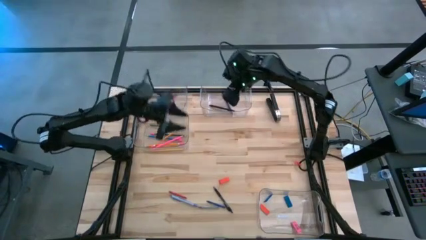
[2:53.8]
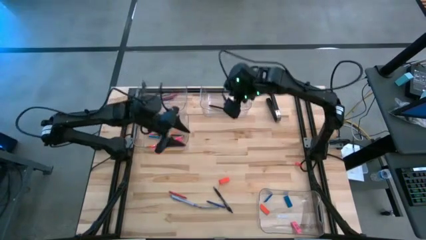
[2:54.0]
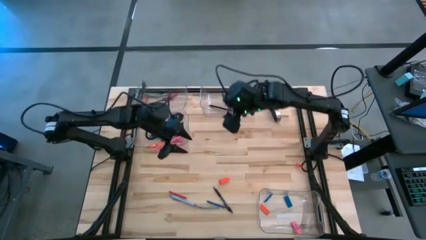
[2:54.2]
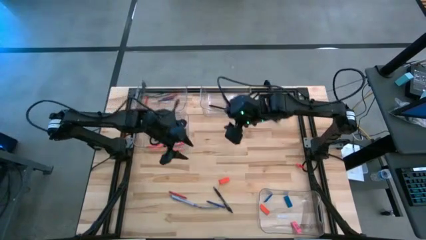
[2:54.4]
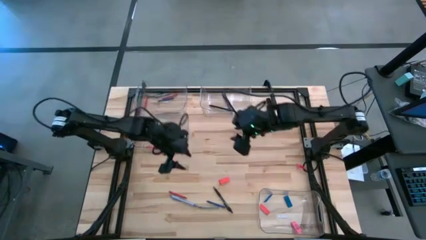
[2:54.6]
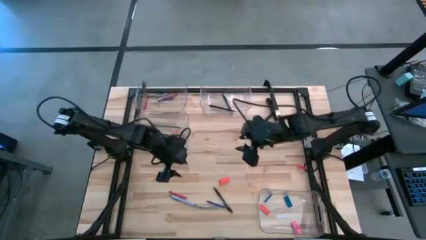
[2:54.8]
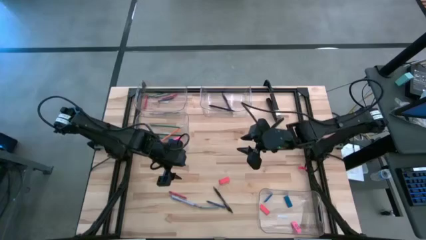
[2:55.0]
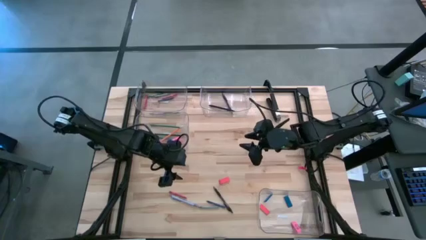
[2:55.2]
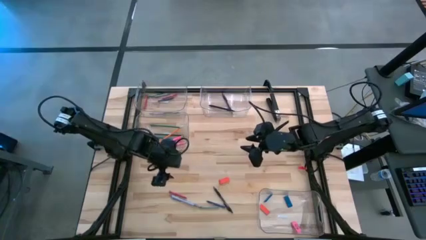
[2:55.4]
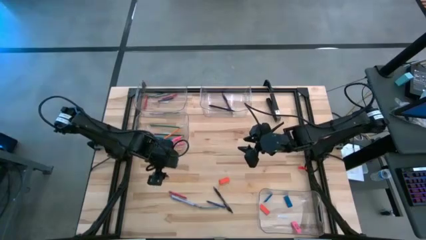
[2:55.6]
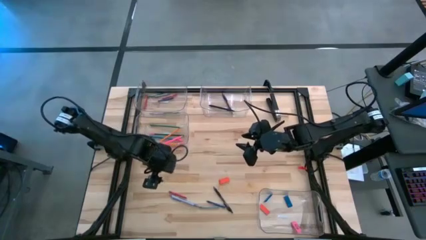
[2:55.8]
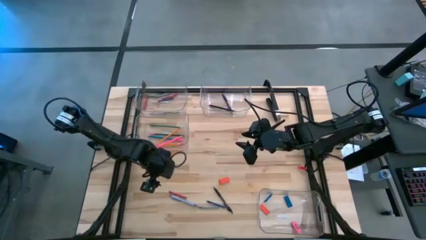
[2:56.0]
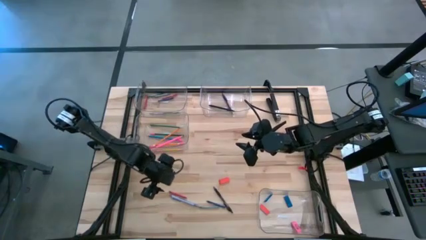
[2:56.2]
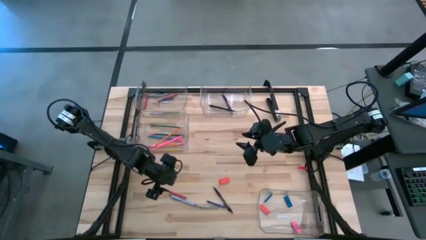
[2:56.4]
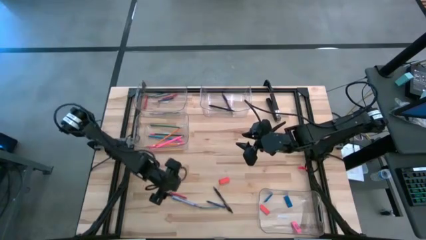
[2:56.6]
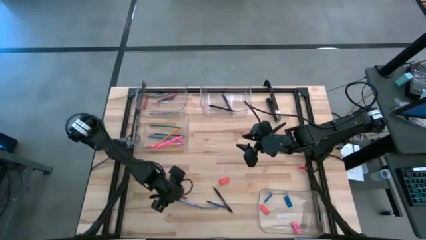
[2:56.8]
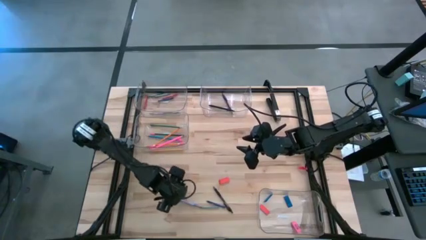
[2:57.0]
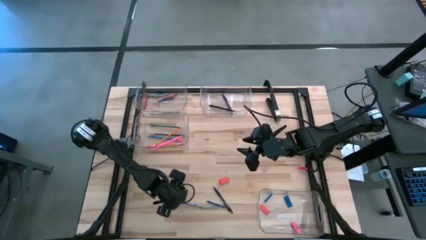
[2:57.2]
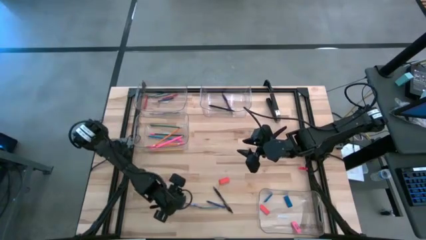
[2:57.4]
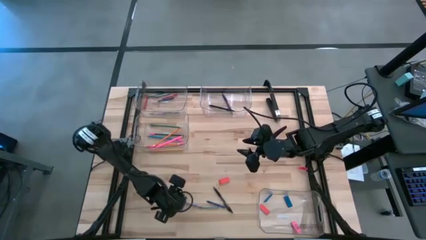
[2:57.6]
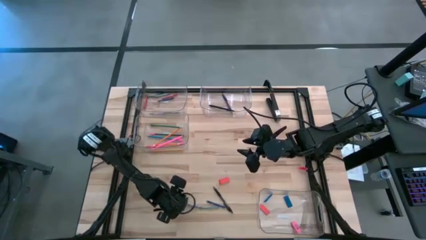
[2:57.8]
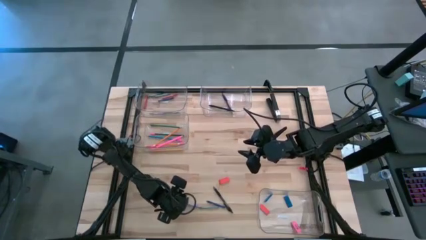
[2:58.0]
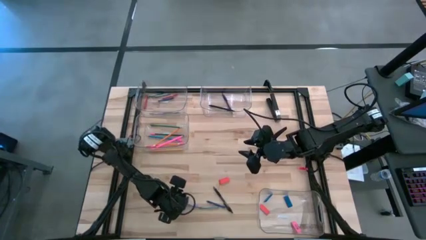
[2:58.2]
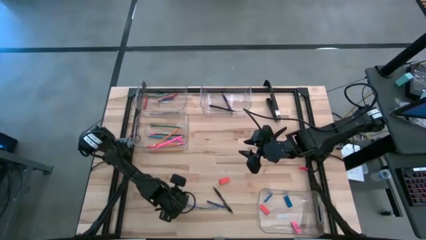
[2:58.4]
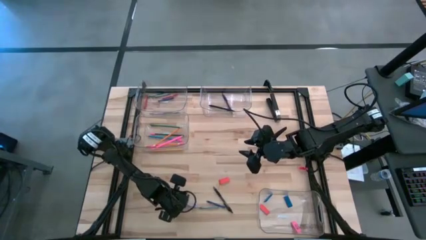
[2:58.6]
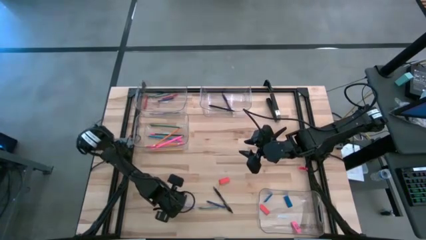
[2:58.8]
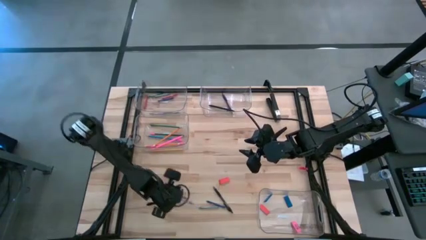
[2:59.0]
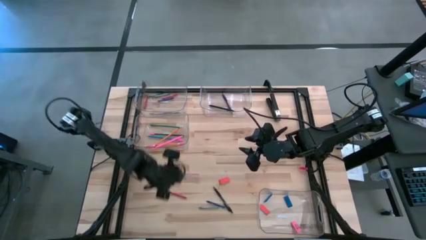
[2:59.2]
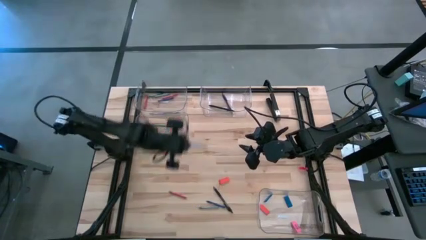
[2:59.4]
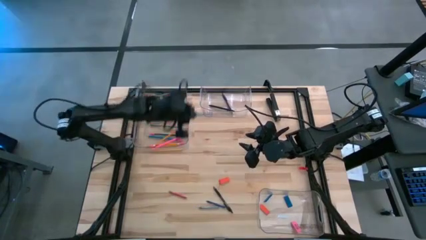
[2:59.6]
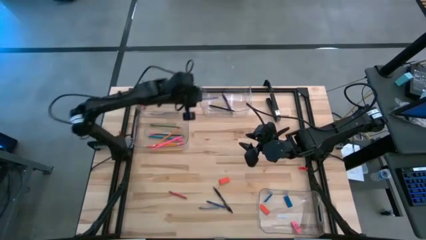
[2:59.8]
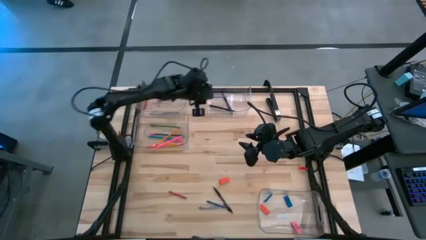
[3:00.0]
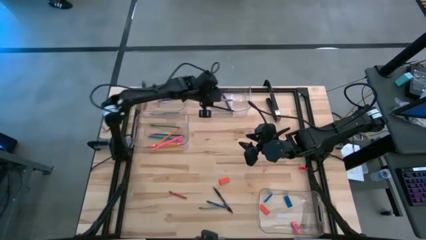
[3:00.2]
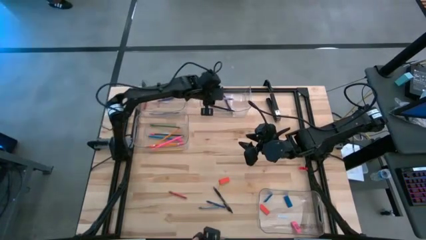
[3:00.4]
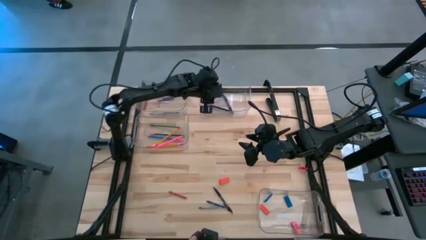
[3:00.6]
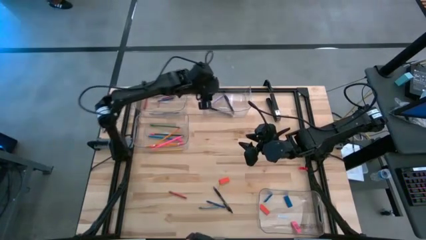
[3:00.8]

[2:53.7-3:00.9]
Task: Sort crayons/erasers/pens/pencils in bins
Put the blue pen into the top right transparent bin

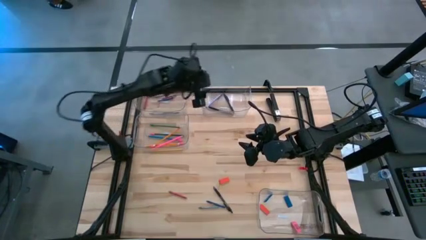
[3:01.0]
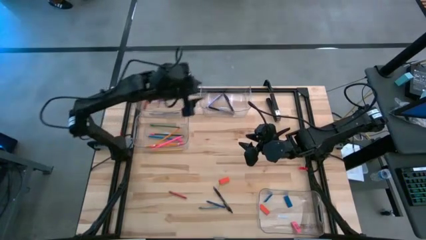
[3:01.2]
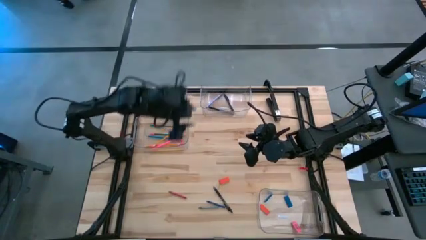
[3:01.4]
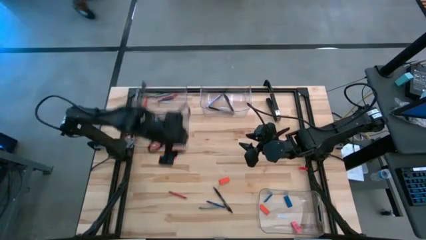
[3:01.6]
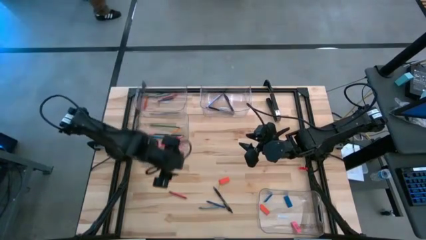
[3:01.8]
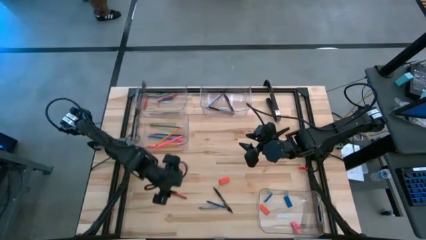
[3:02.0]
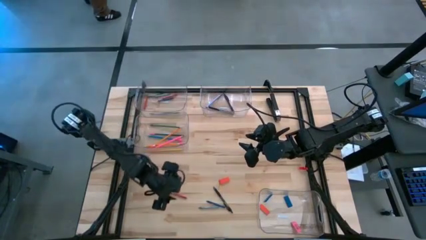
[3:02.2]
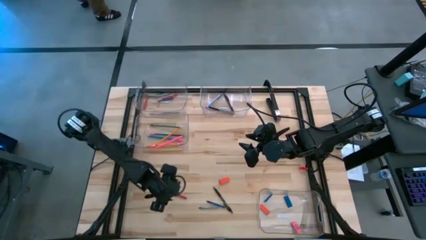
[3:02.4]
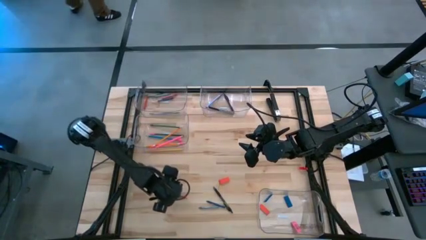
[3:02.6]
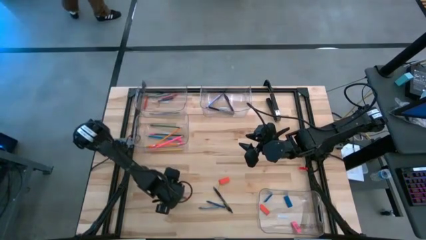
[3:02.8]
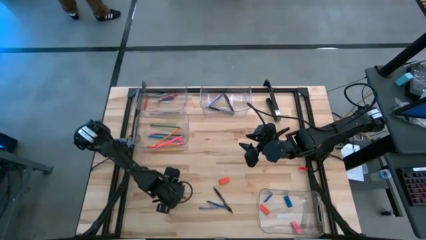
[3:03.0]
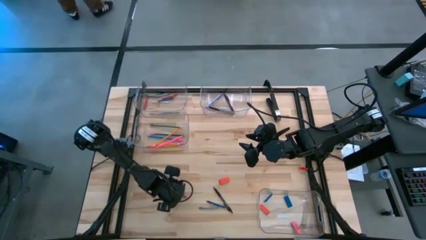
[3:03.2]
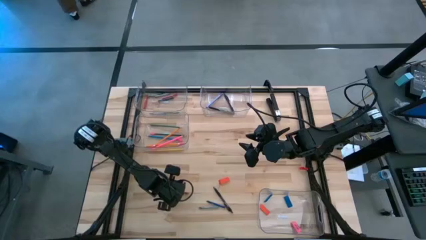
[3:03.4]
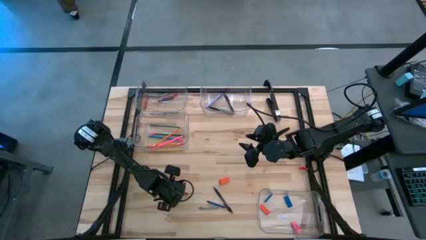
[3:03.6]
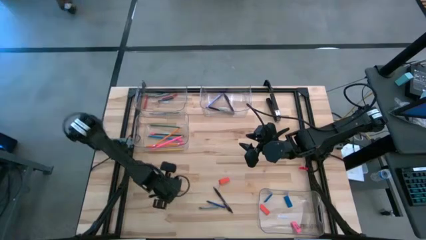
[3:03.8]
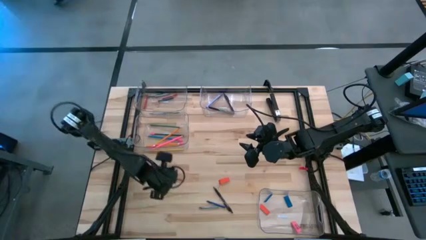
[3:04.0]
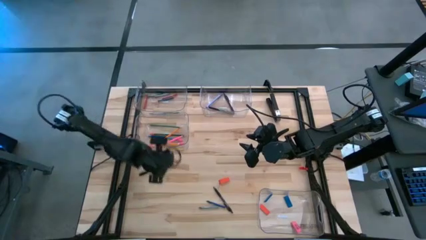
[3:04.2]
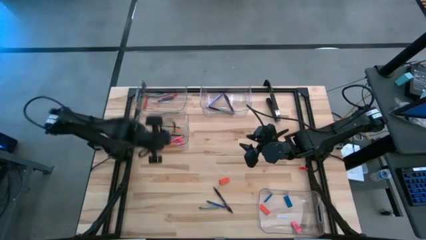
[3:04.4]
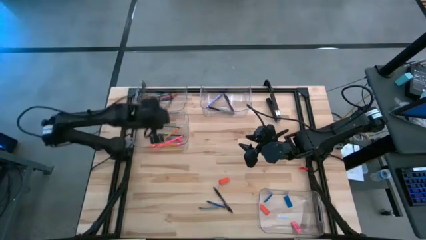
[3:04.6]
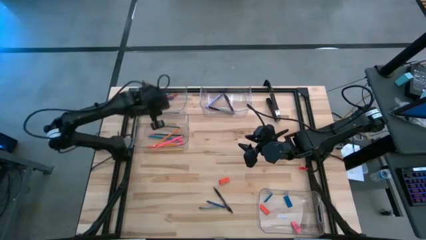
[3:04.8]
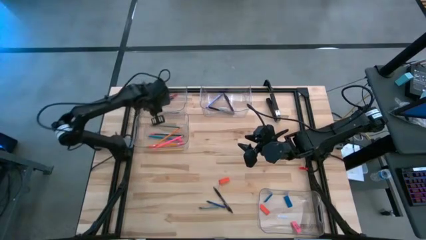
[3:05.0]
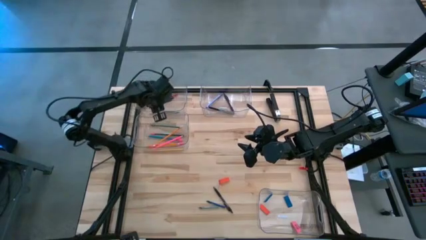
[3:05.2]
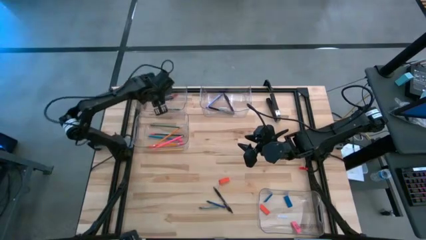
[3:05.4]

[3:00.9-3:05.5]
Put the red crayon into the top left transparent bin

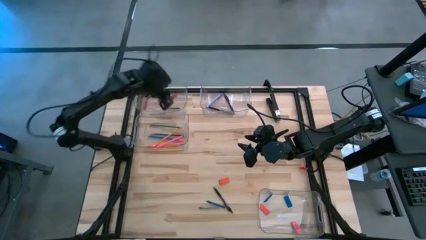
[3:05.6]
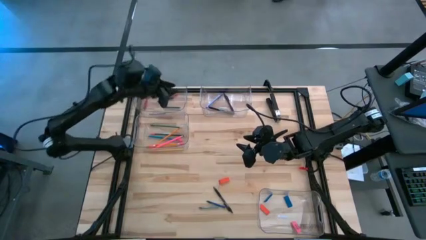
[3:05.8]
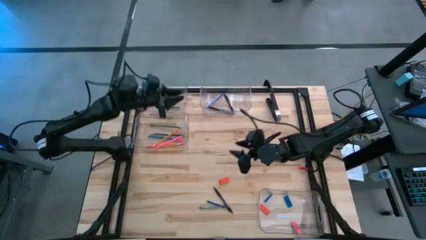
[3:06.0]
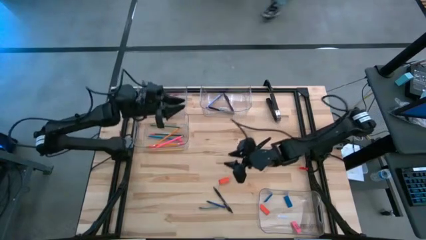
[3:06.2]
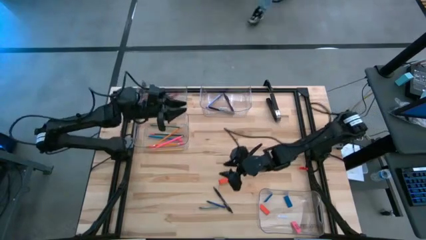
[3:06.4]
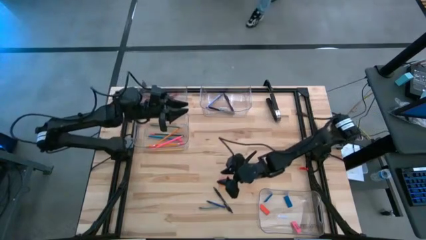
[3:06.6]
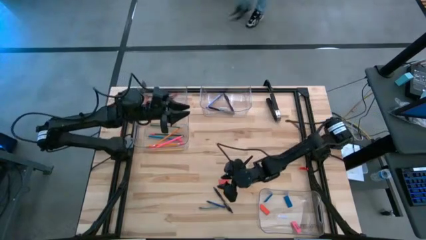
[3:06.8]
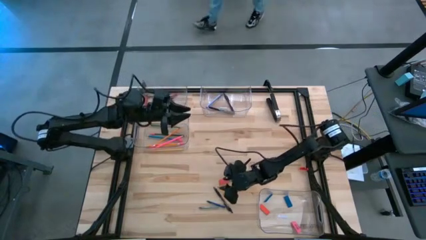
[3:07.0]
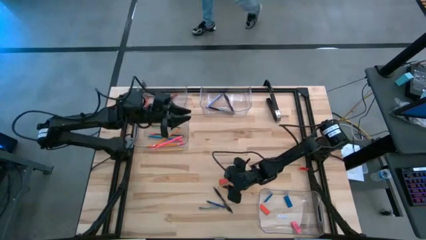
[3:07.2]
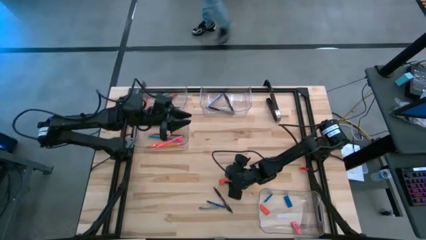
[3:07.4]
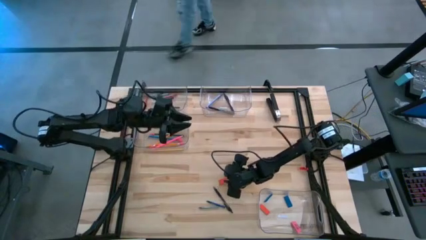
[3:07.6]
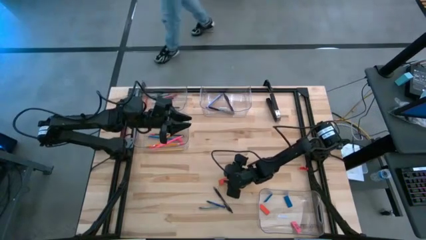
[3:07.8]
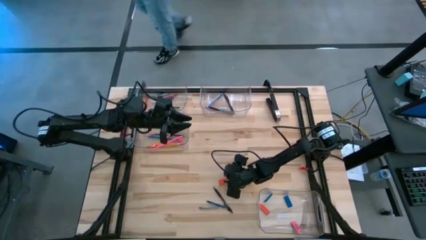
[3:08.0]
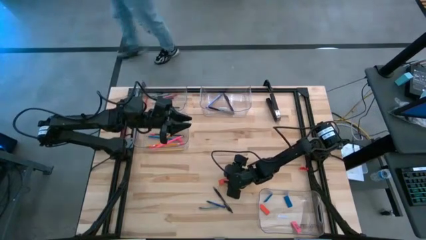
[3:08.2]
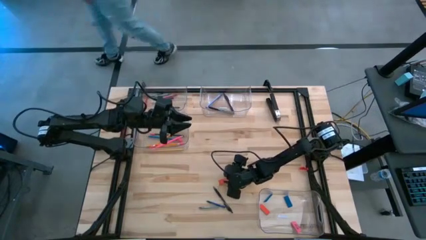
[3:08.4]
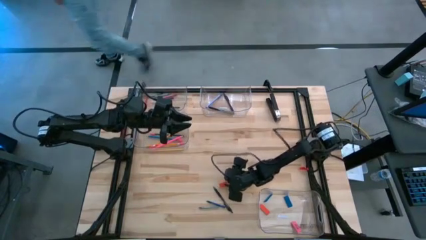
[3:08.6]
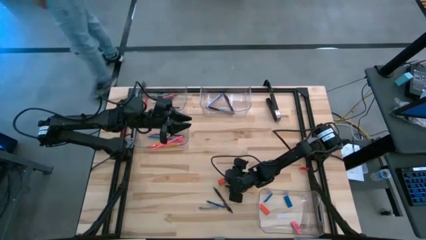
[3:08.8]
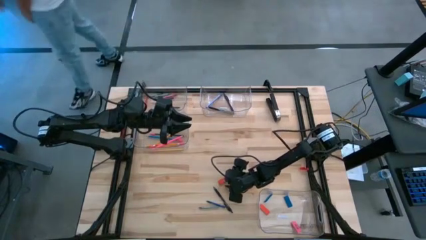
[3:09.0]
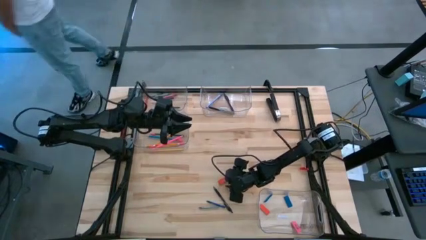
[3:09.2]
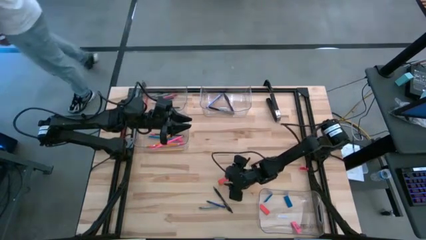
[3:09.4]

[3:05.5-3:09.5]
Put the orange eraser into the bottom right transparent bin

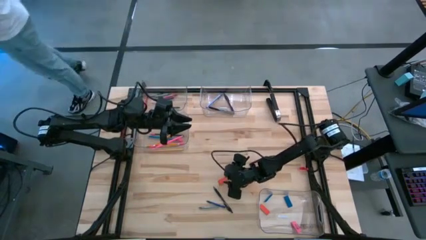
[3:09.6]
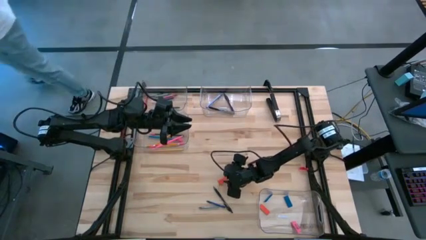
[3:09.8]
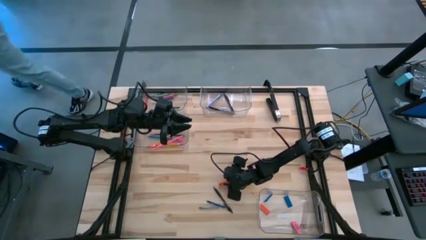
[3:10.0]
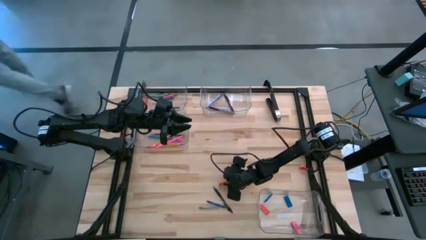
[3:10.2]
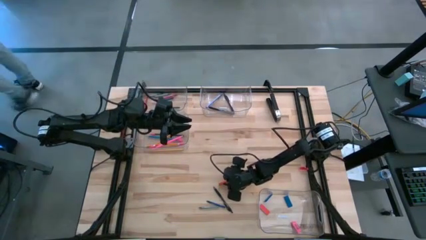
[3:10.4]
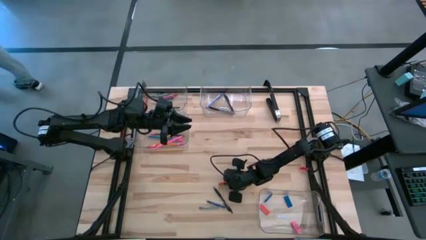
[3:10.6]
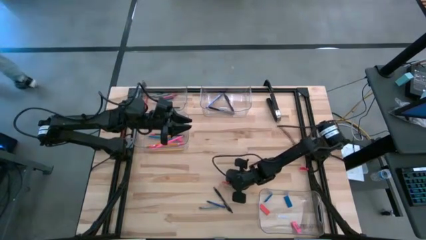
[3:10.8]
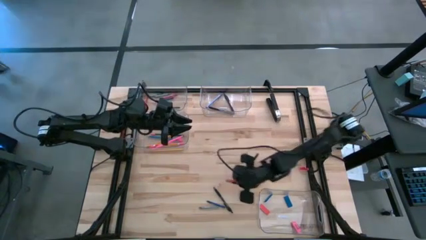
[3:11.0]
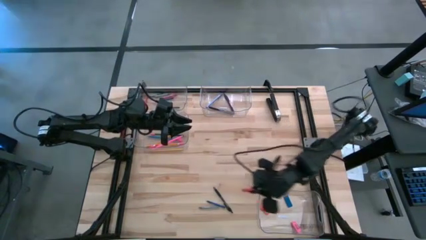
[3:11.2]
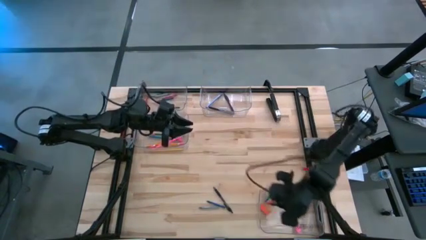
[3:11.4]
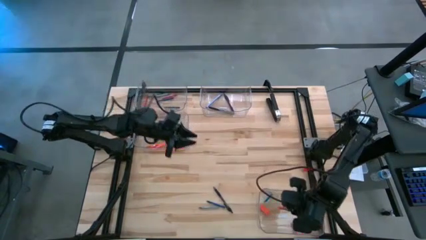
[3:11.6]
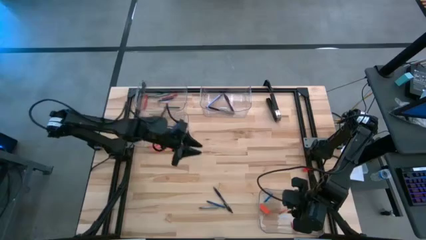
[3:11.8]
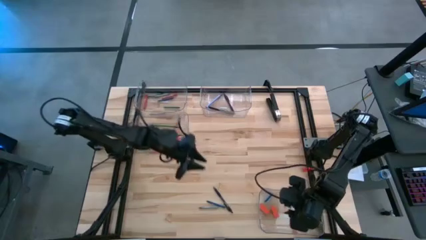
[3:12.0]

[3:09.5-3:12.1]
Put the orange eraser into the bottom right transparent bin
